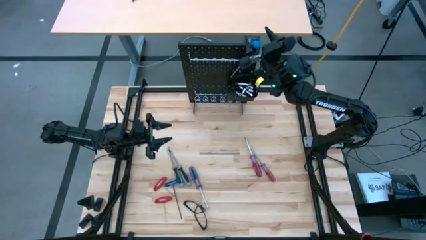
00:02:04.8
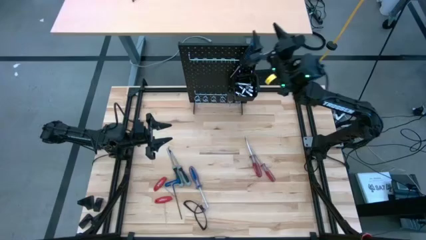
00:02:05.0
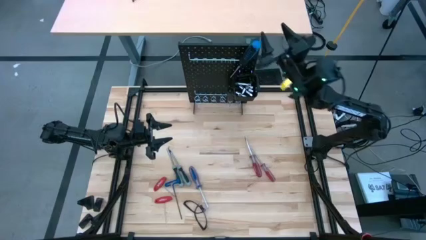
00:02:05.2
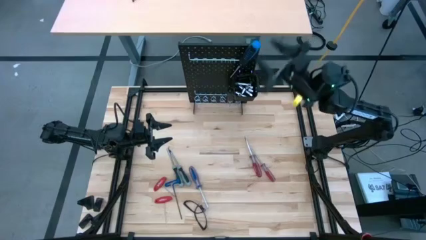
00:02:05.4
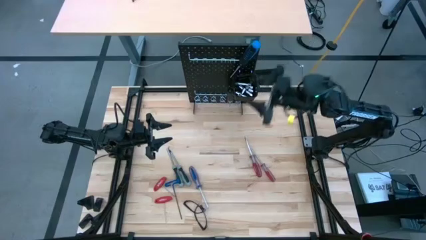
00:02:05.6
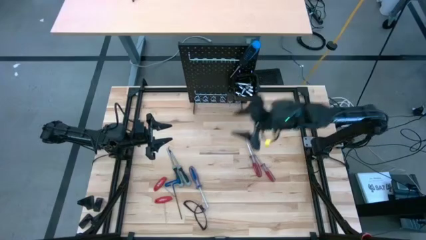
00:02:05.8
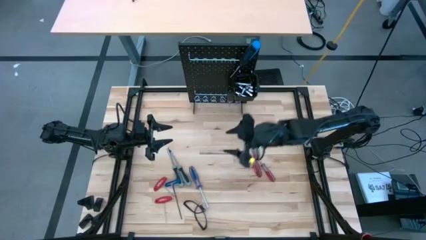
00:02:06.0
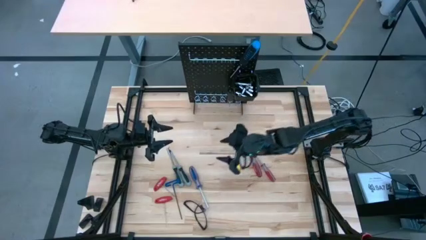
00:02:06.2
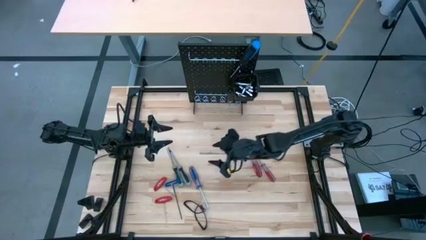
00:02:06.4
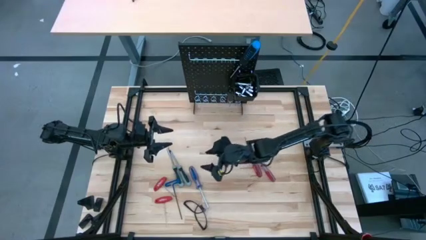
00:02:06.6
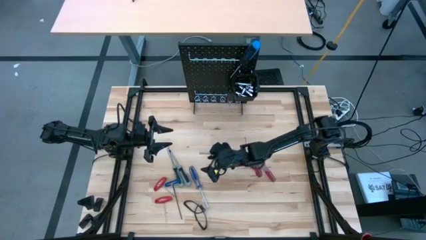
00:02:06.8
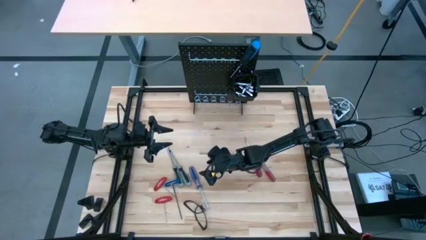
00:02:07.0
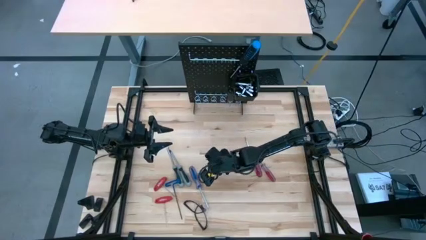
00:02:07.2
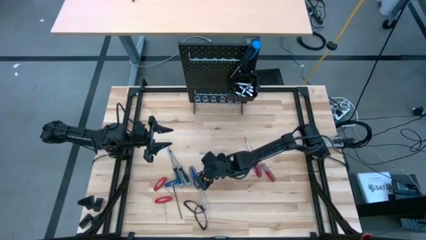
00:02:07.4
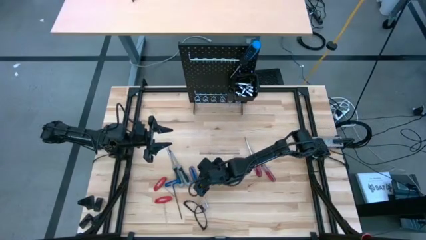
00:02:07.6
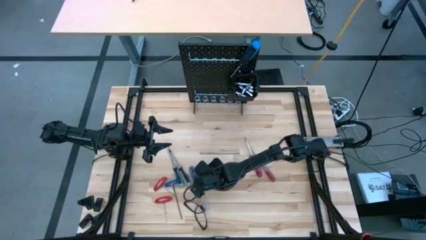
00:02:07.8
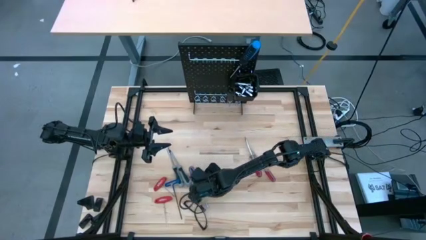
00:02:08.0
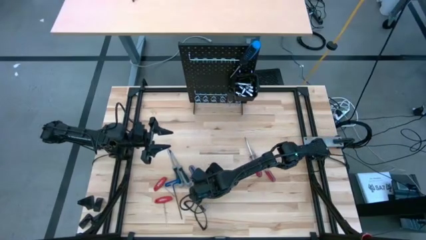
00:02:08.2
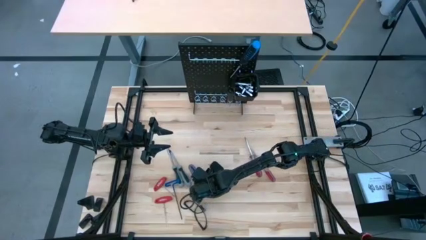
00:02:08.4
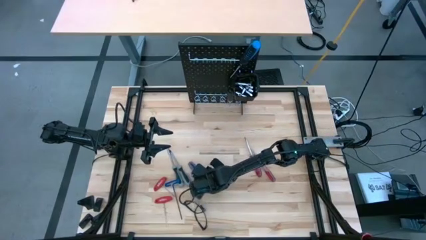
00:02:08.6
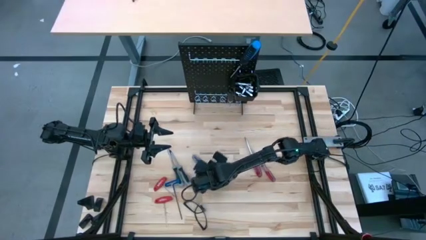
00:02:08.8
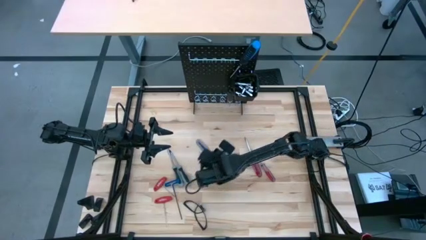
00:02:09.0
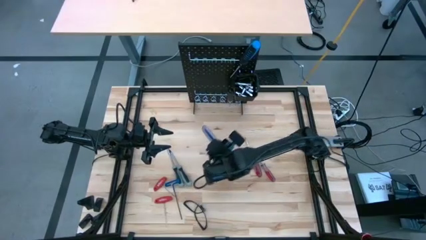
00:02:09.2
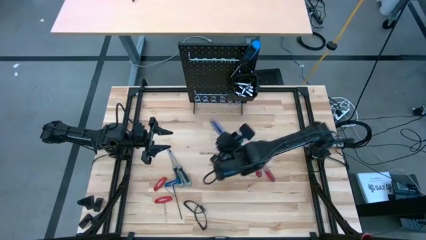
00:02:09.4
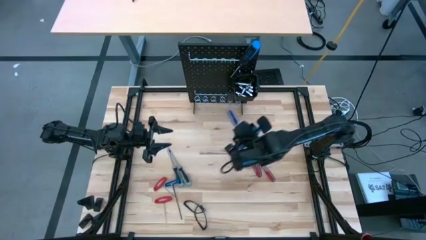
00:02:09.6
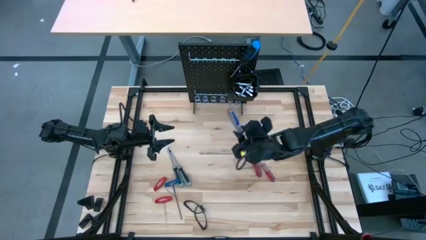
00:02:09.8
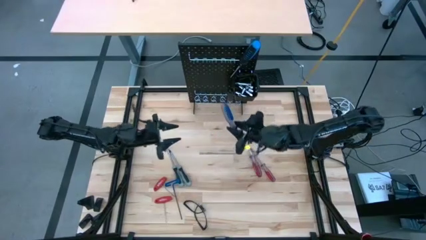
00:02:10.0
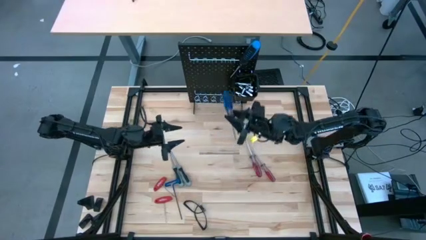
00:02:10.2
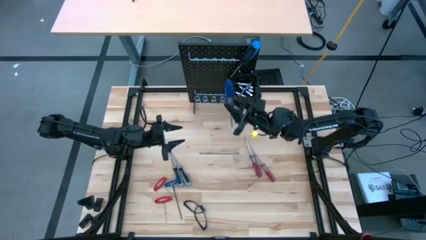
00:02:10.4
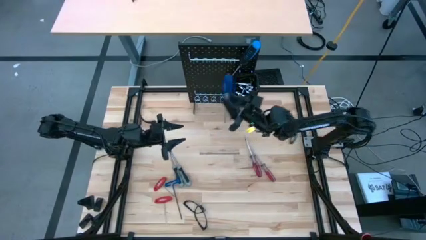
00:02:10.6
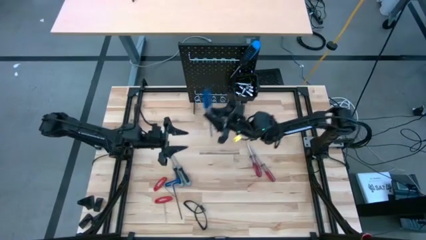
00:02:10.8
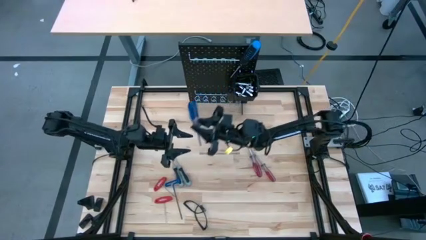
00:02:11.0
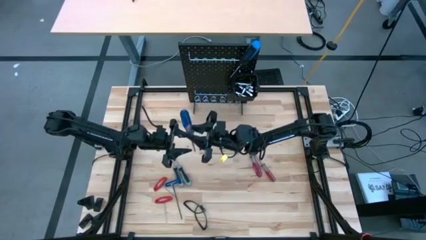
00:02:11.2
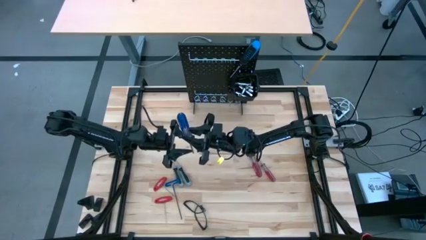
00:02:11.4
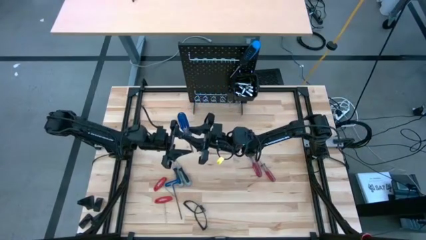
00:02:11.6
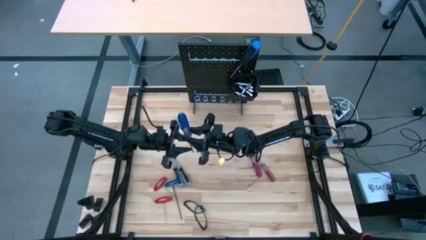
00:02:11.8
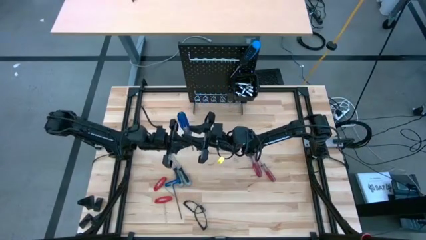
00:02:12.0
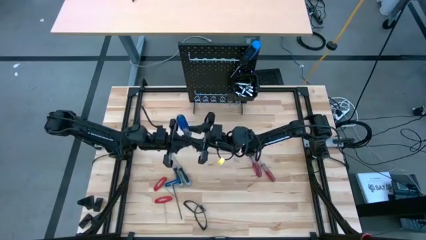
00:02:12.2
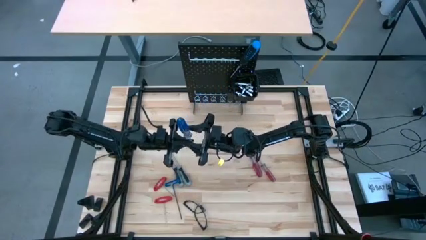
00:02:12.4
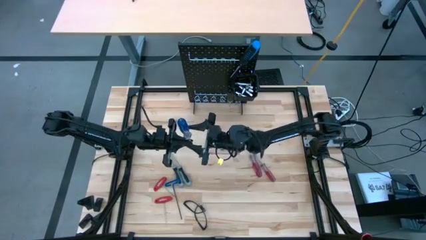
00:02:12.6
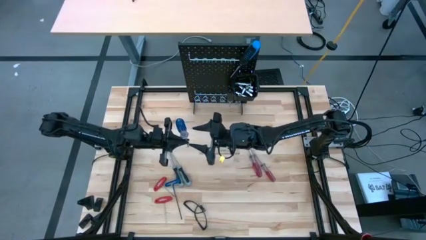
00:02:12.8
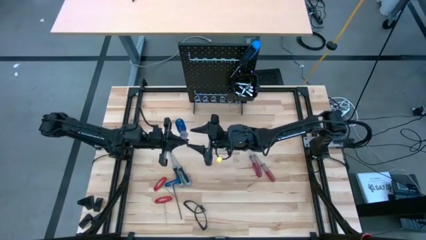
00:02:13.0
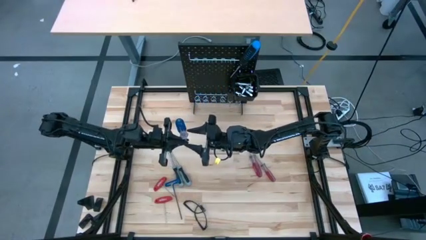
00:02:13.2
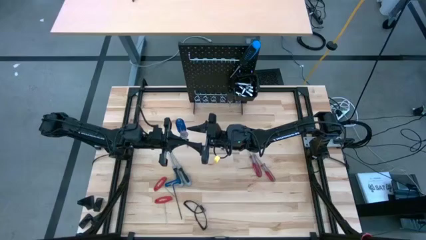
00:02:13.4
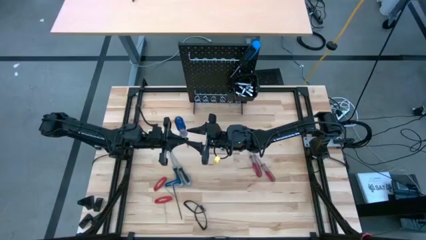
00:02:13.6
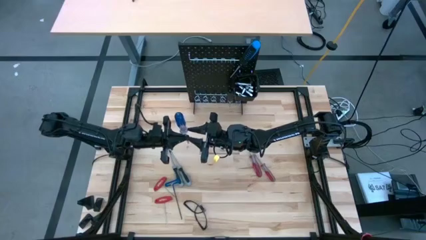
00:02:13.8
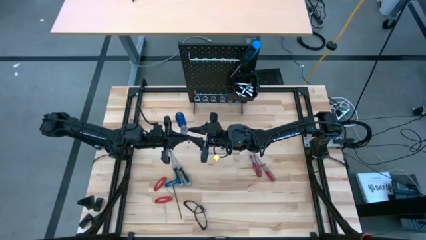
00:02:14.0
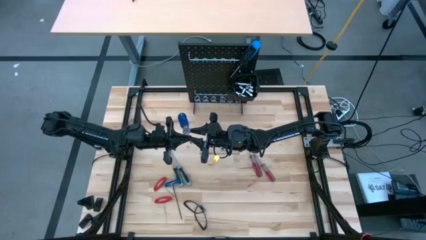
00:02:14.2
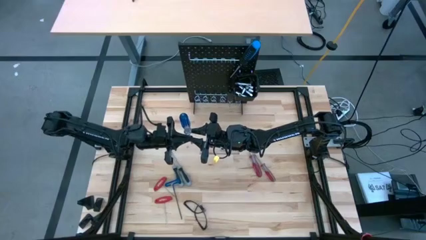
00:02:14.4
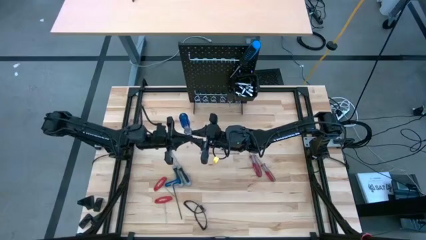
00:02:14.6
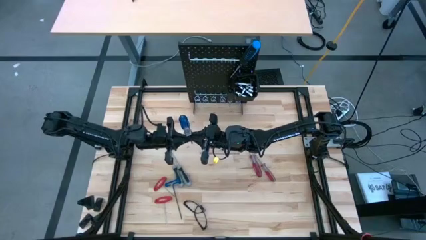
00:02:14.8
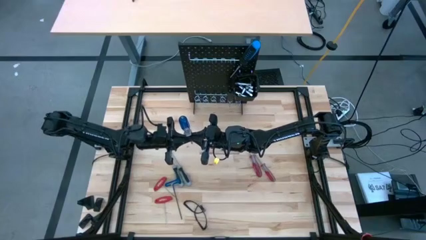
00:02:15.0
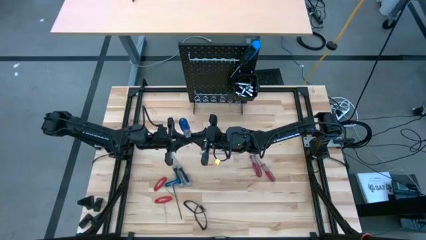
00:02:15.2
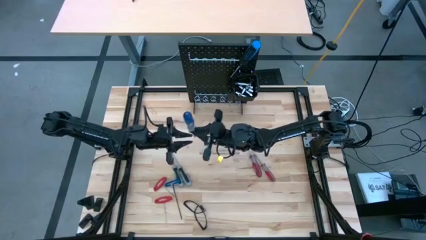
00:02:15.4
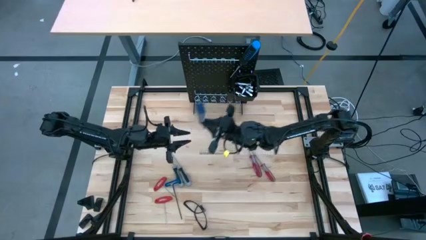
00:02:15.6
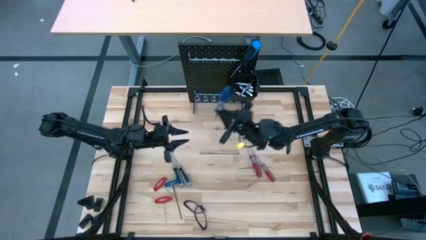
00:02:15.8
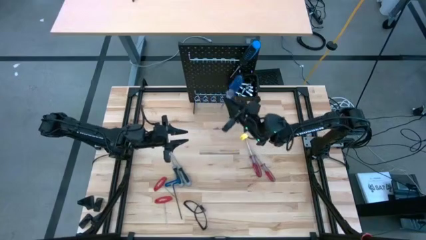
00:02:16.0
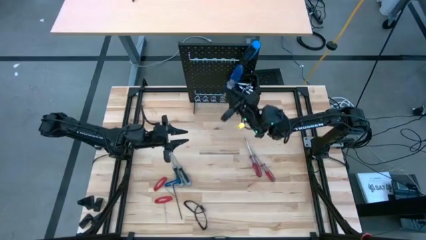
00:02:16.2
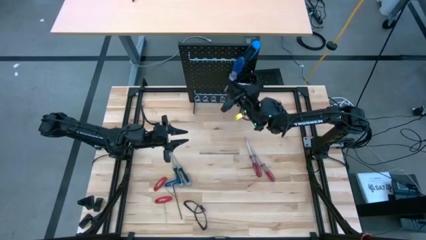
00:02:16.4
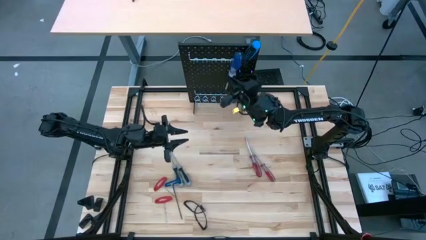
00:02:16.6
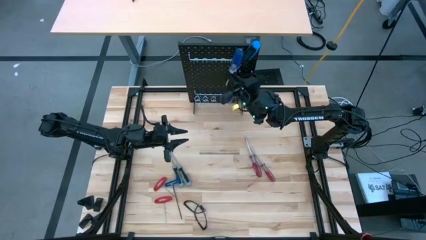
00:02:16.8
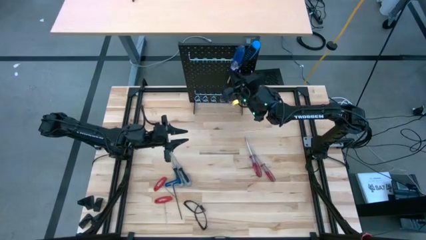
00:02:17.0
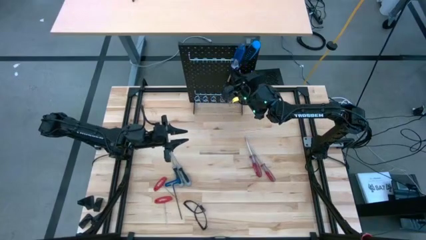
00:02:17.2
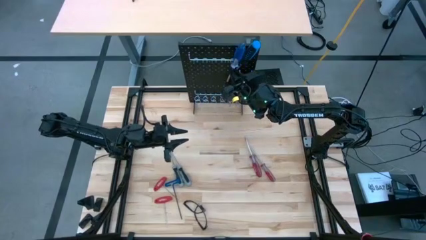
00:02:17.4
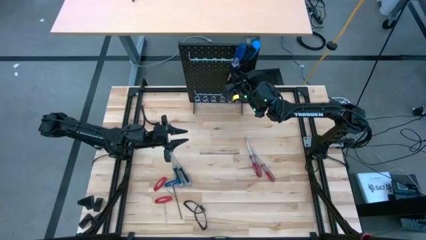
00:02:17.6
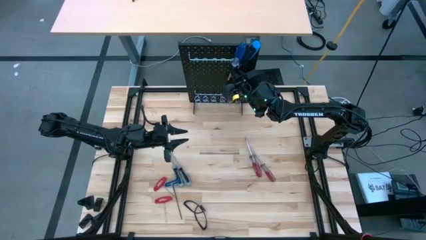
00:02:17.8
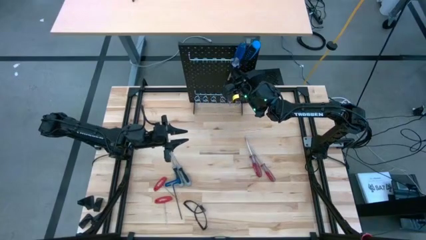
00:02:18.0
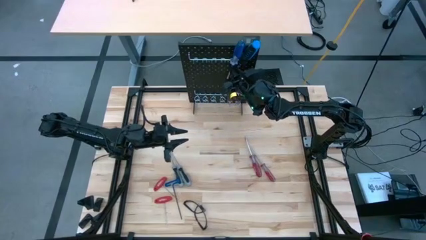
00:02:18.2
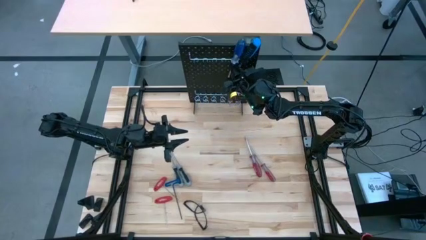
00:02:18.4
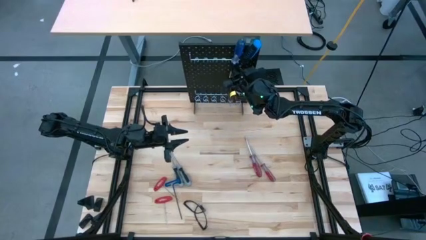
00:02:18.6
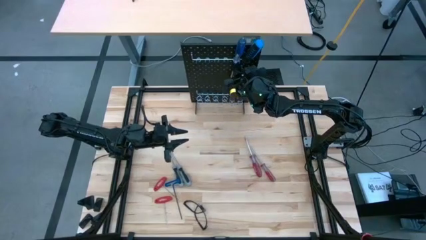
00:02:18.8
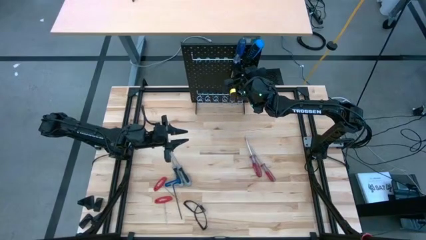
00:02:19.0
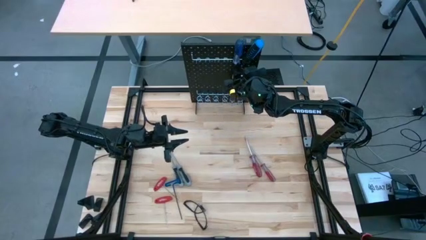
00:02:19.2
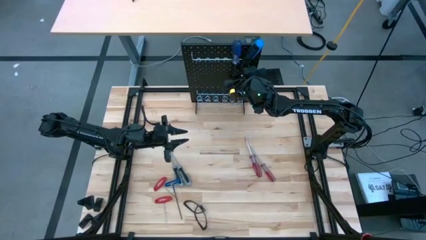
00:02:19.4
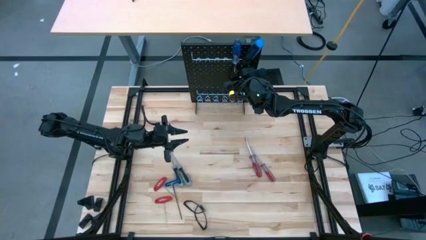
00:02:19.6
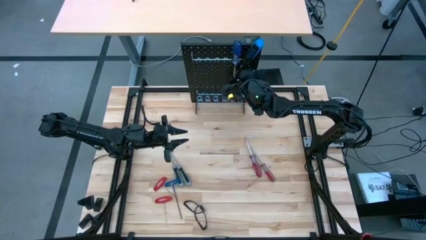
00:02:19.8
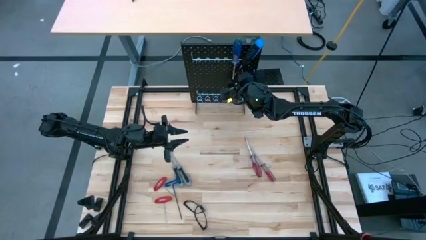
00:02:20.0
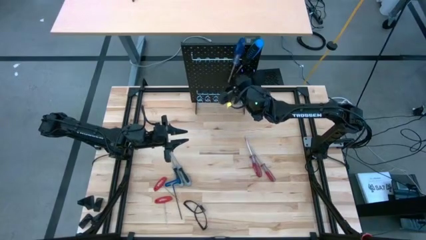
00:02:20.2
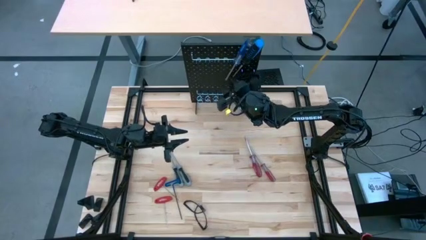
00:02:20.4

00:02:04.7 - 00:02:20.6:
Task: Hang tools onto peg board
Hang the transparent screwdriver on the pegboard

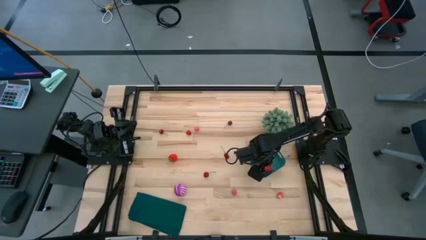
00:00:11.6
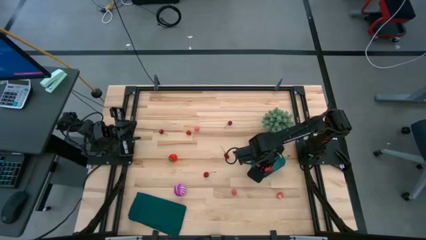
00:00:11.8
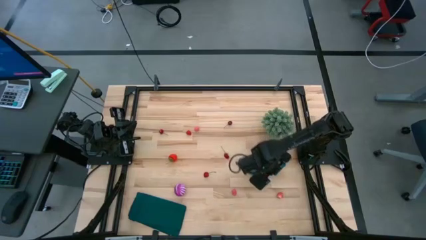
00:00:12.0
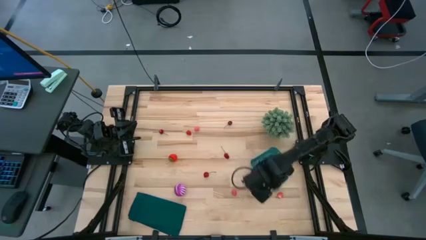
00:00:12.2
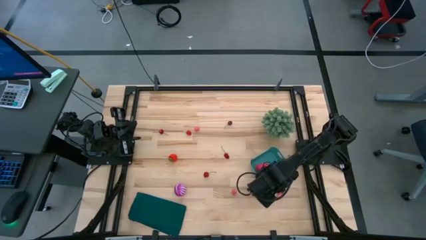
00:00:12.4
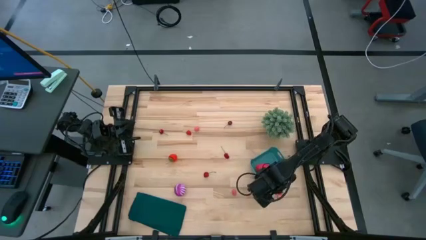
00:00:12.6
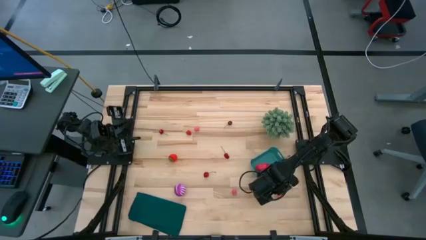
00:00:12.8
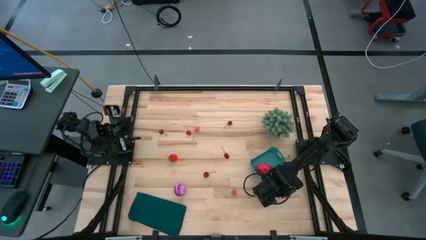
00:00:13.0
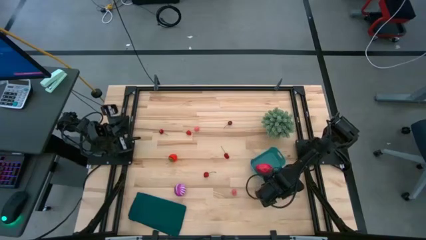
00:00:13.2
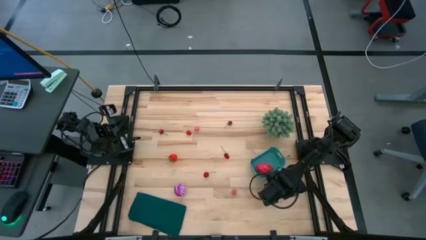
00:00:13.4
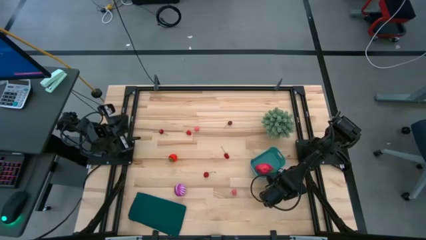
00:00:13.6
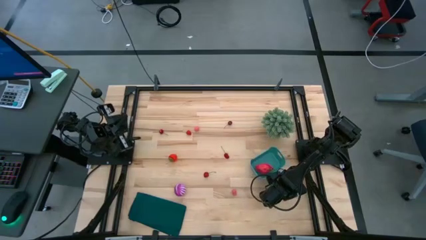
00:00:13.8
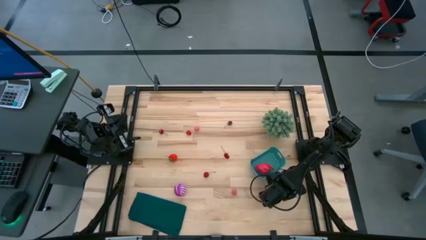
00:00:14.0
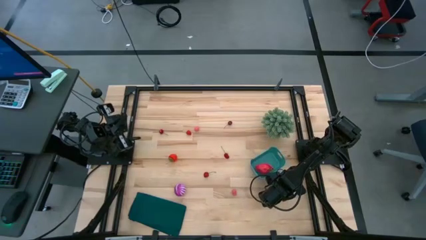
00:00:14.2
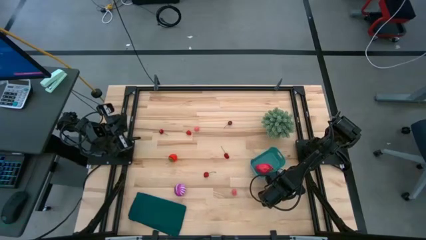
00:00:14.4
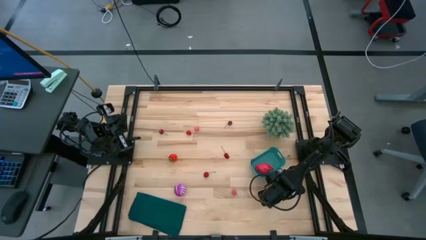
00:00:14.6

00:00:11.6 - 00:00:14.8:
Task: Pick and placing Produce into tupperware
Put the peach into the green bin
